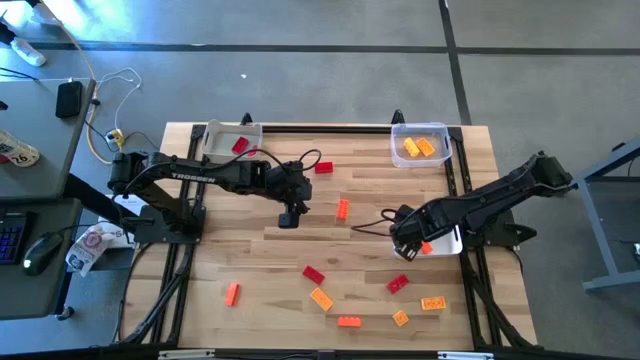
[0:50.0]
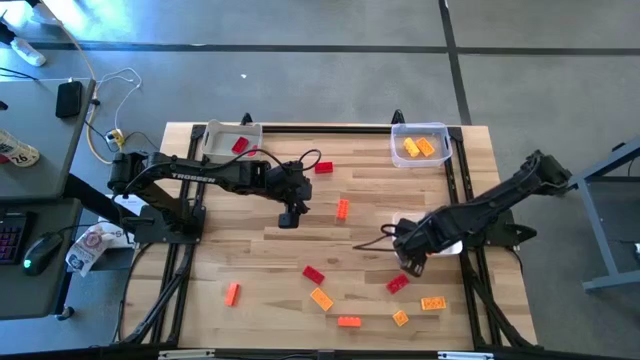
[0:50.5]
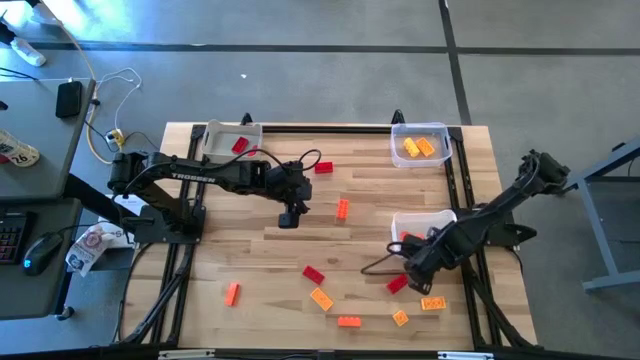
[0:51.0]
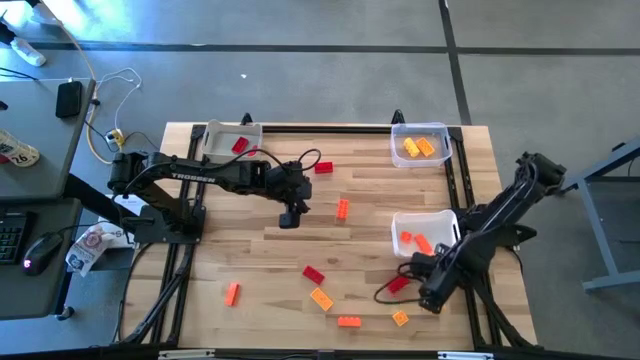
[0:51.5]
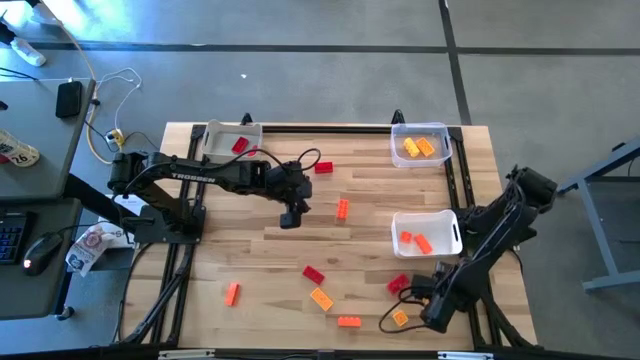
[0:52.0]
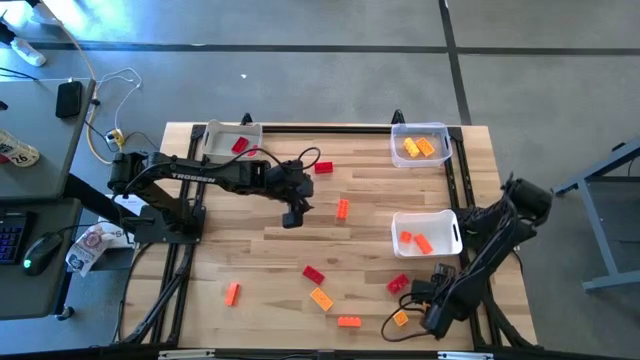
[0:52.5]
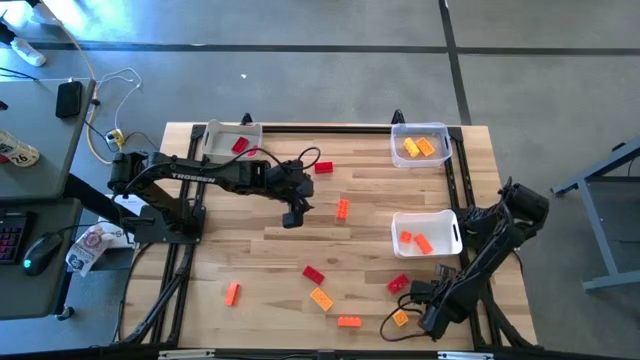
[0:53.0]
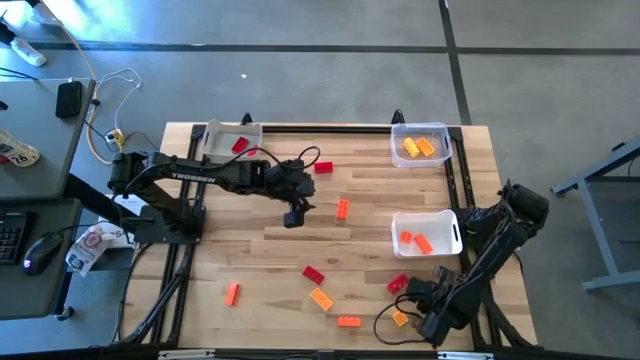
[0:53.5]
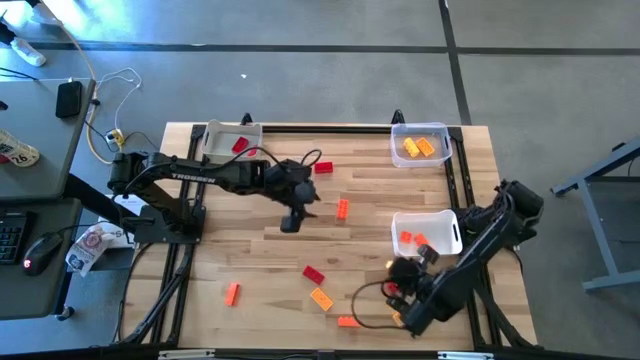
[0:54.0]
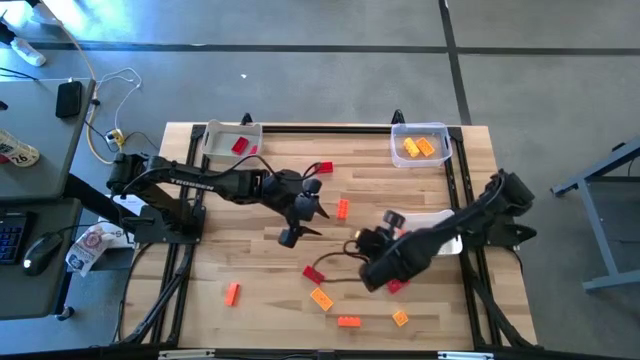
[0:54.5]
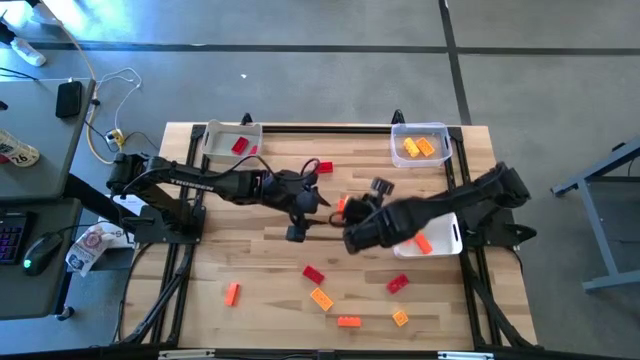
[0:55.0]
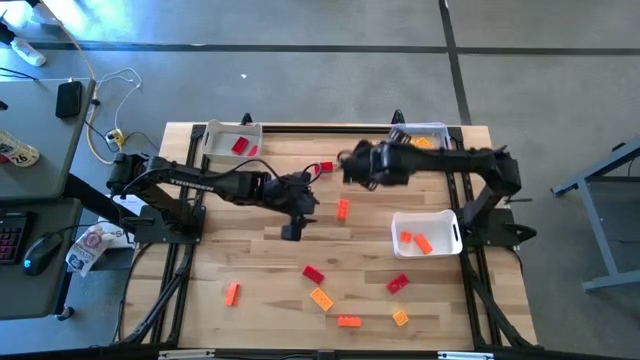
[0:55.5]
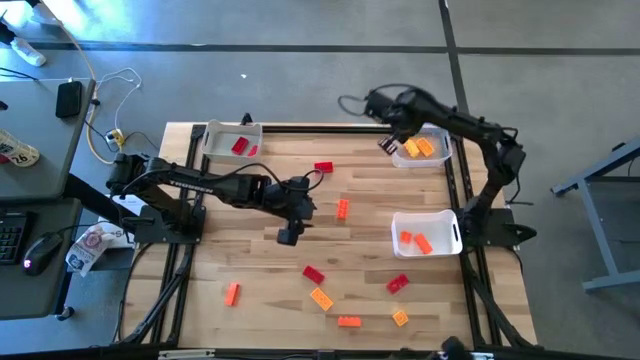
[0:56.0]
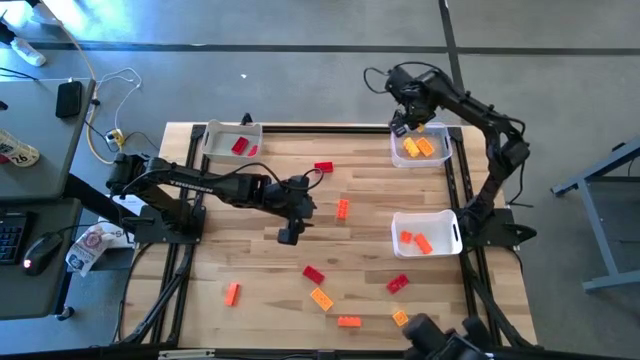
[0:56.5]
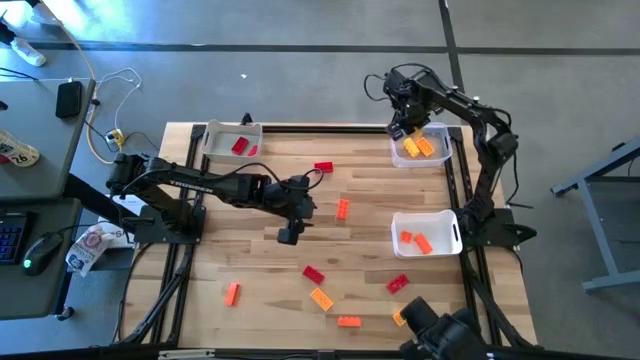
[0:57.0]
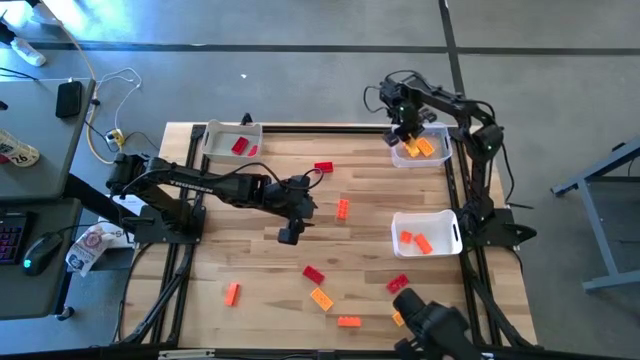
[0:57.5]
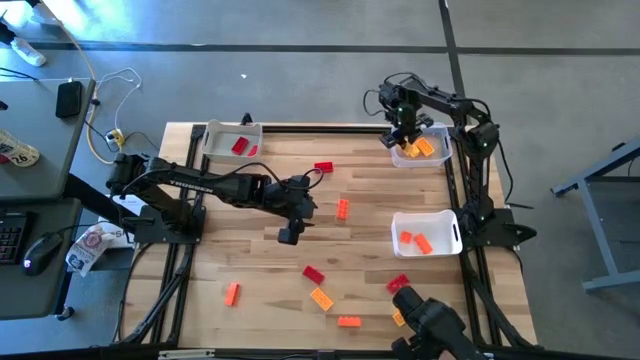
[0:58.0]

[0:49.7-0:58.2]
Task: Sort & place blocks by color
Put the yellow game piece into the transparent bin

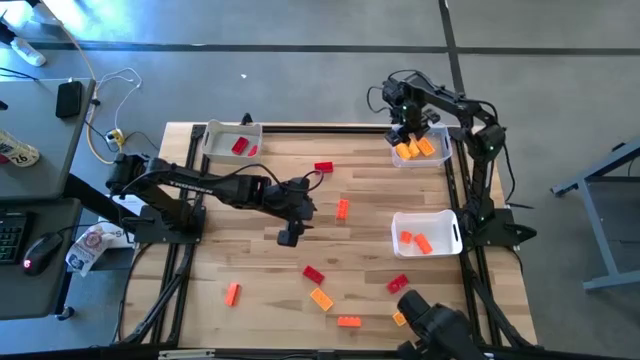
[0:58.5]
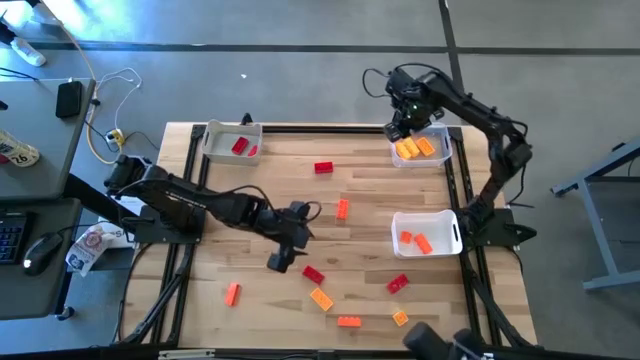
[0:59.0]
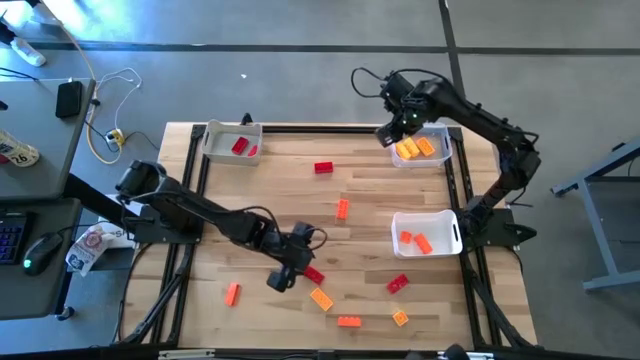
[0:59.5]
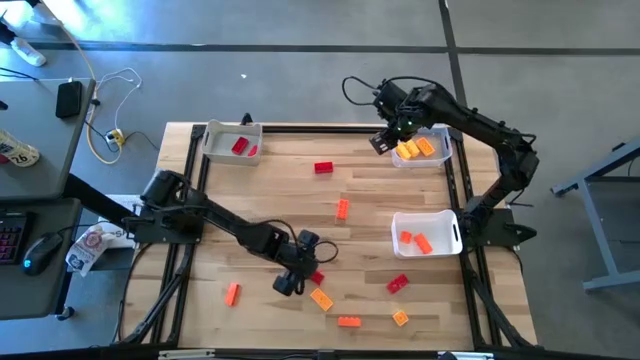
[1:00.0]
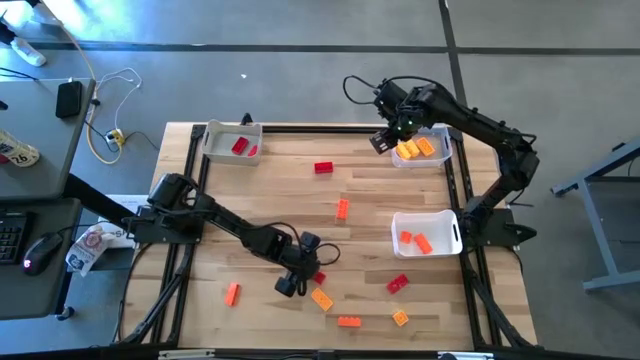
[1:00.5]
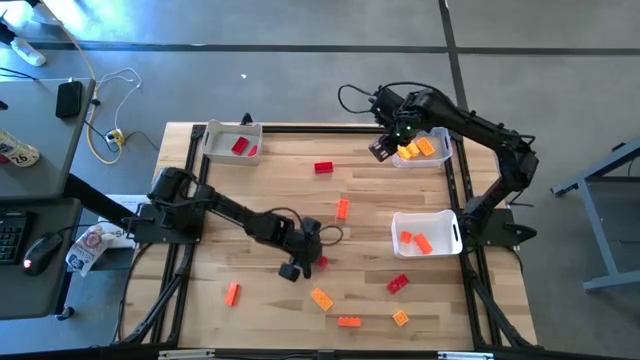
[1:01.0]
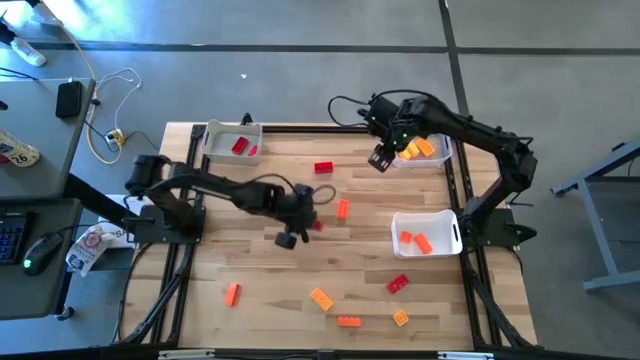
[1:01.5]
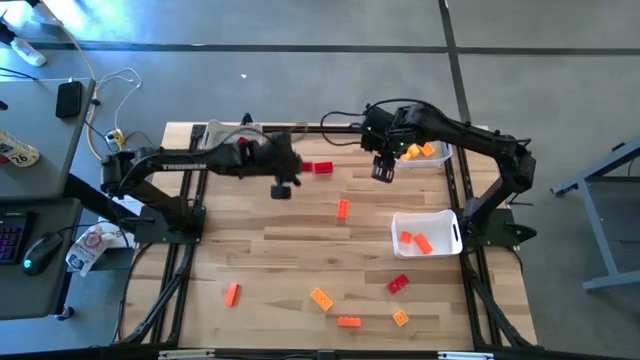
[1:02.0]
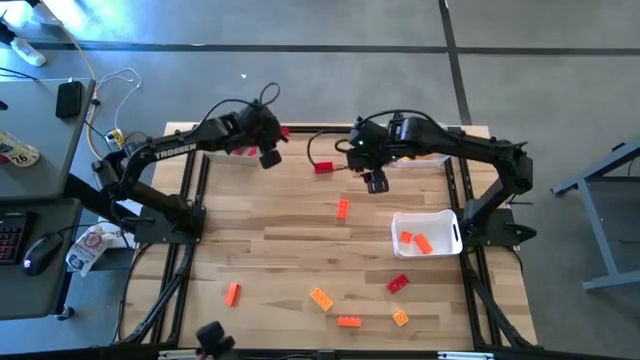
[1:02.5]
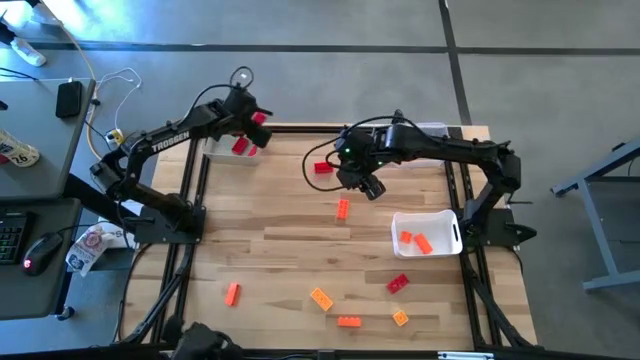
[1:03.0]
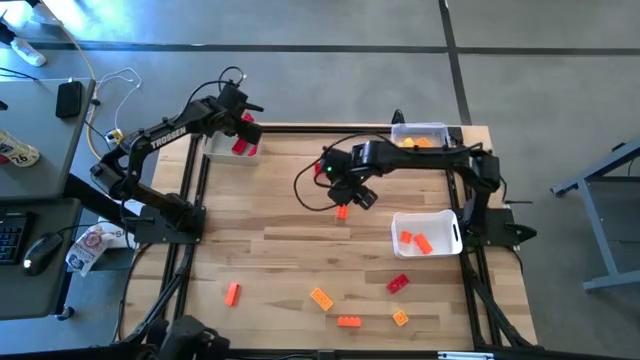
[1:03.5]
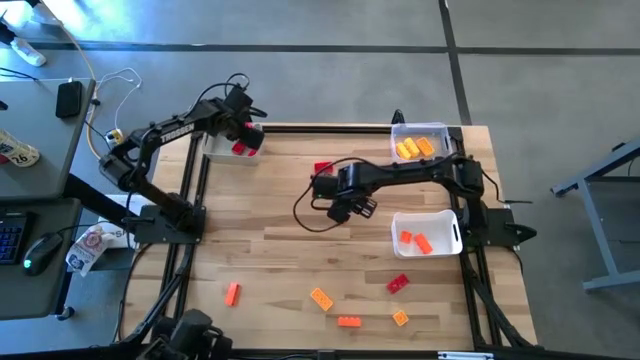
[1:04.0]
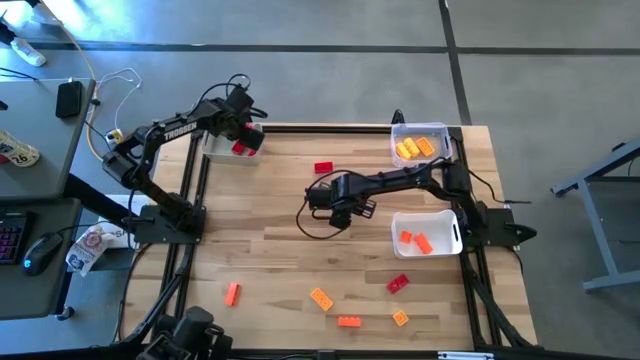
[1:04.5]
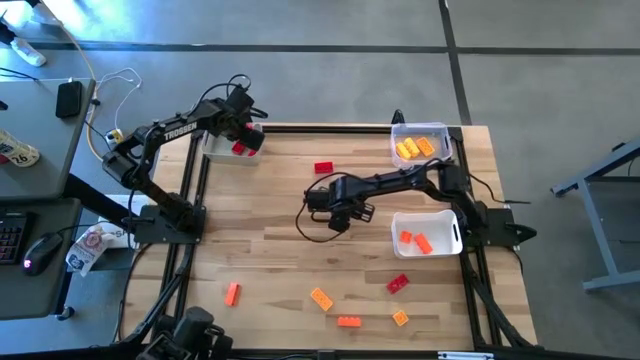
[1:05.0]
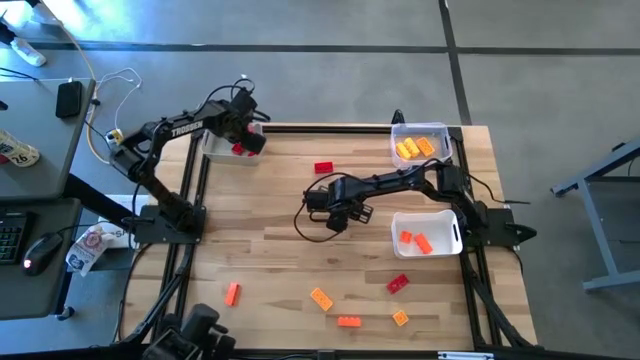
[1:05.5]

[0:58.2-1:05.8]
Put the red game piece into the gray bin

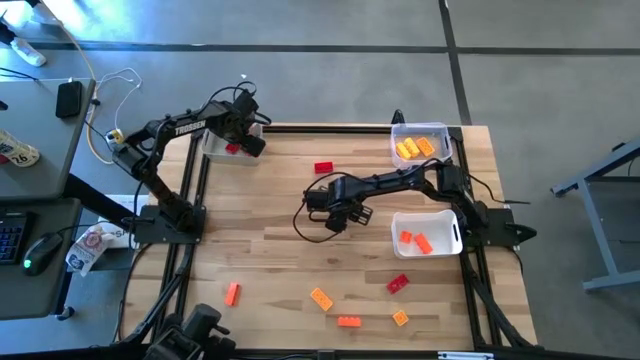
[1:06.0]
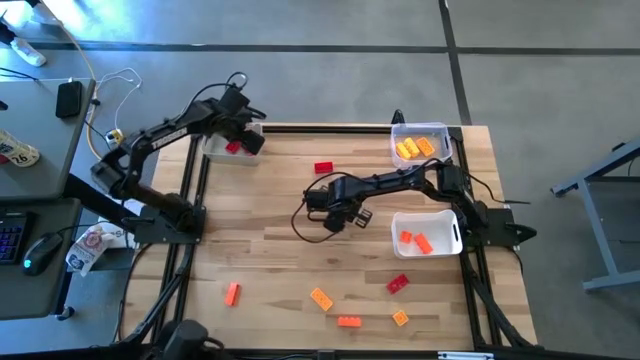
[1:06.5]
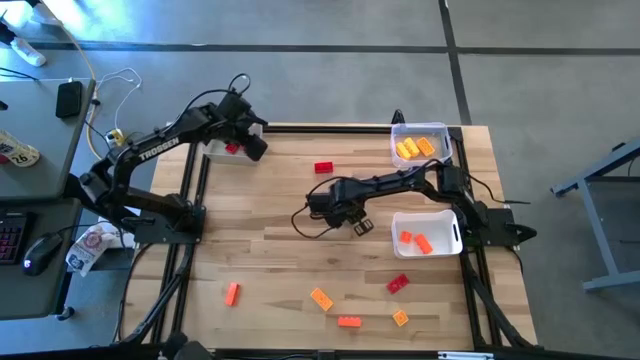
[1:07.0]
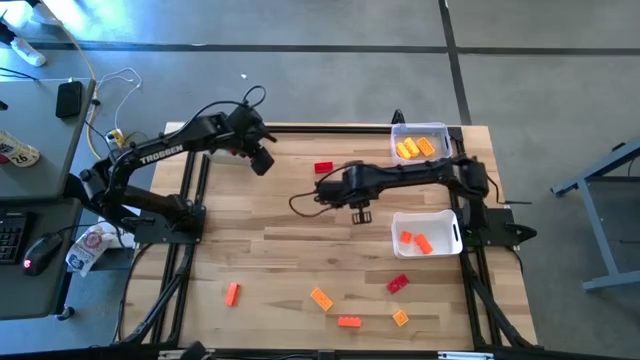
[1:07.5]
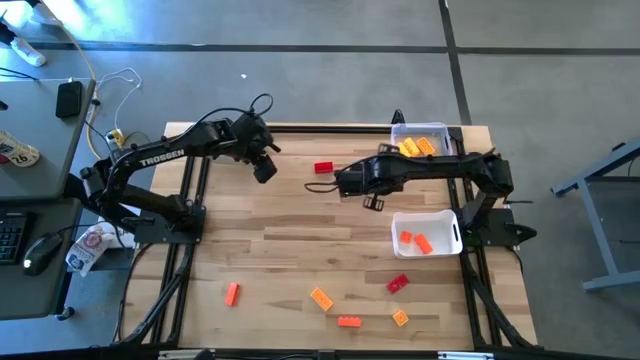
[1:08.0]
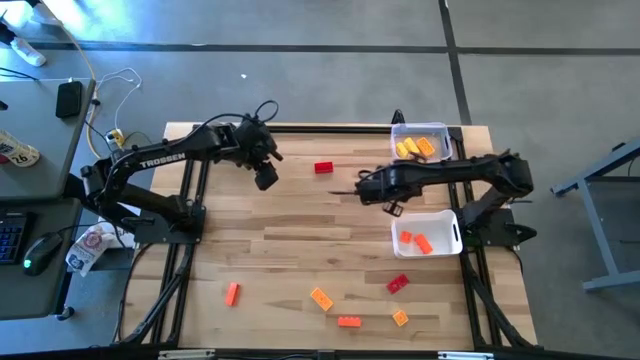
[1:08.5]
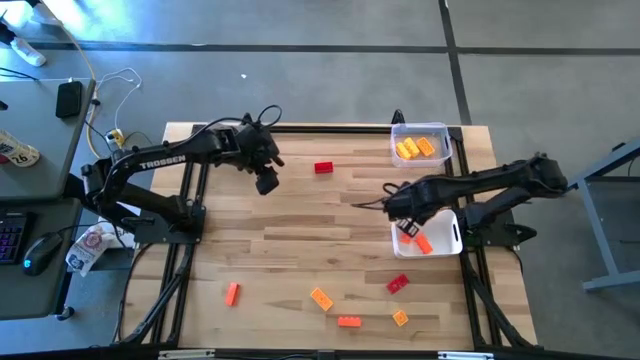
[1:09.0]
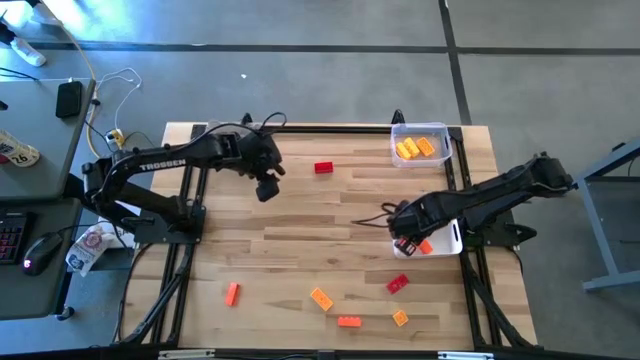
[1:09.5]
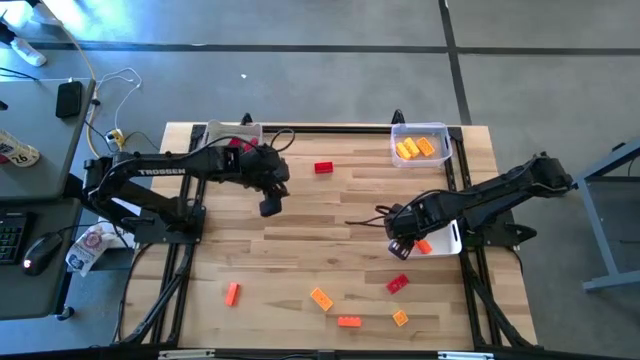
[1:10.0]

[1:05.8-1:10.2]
Put the orange game piece into the white bin
